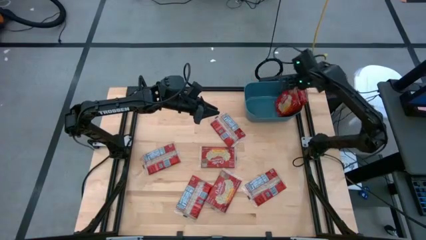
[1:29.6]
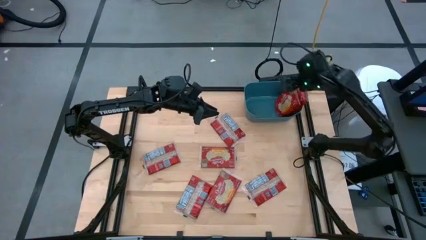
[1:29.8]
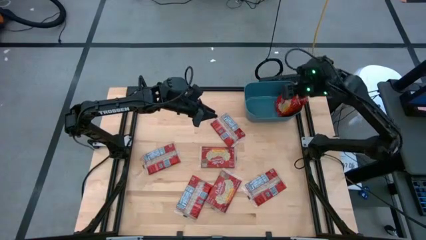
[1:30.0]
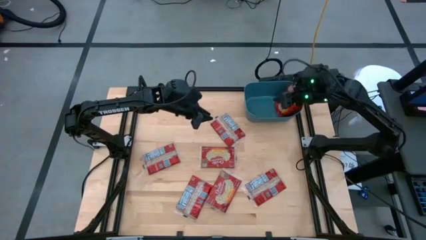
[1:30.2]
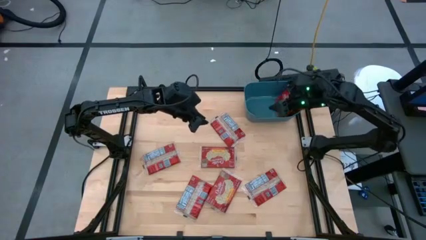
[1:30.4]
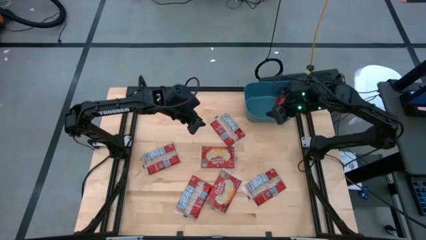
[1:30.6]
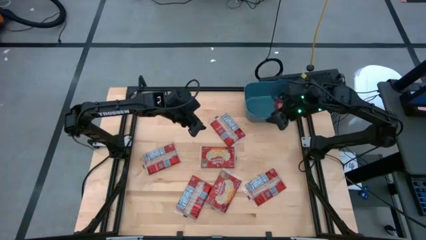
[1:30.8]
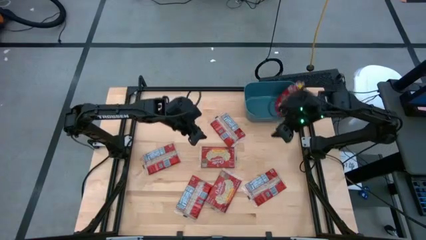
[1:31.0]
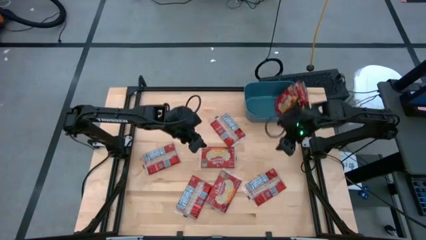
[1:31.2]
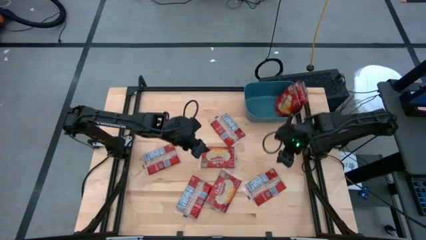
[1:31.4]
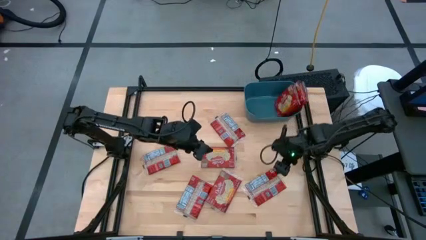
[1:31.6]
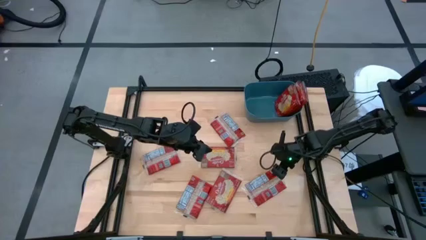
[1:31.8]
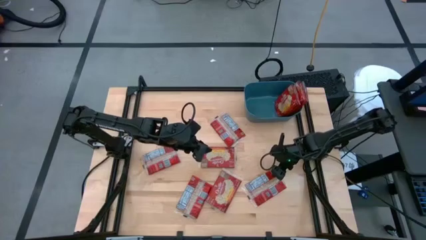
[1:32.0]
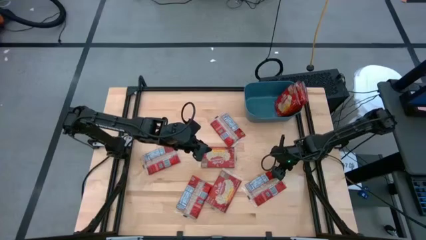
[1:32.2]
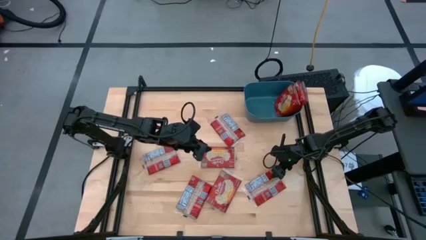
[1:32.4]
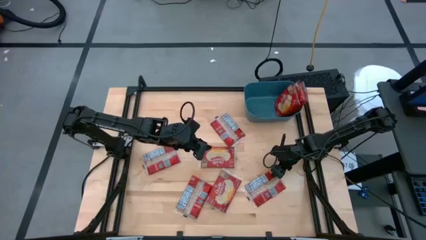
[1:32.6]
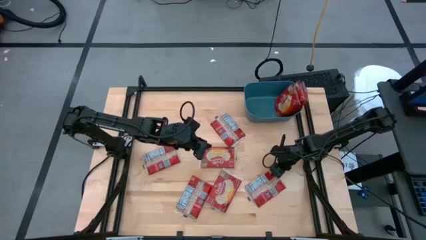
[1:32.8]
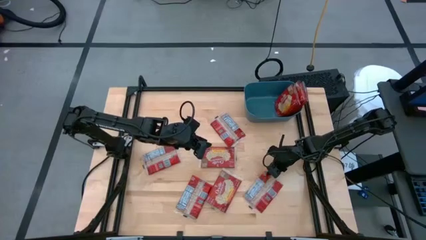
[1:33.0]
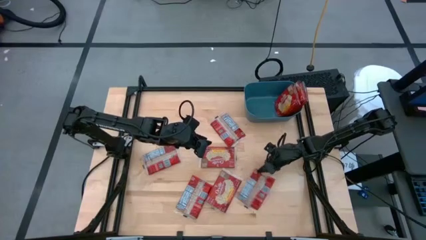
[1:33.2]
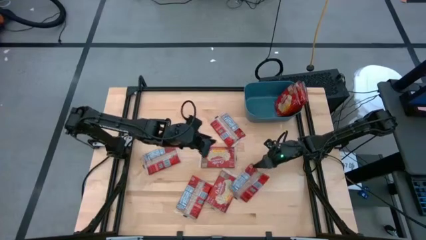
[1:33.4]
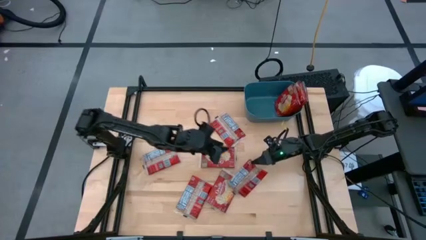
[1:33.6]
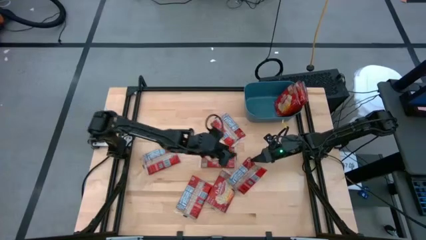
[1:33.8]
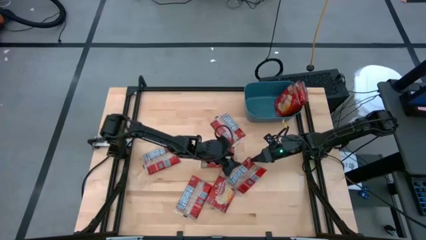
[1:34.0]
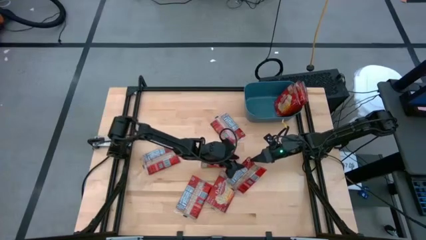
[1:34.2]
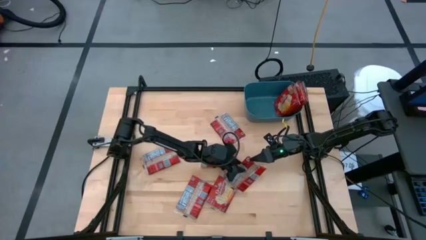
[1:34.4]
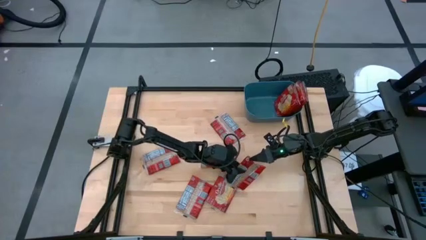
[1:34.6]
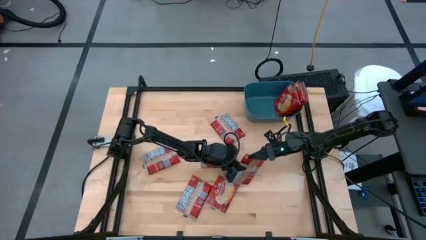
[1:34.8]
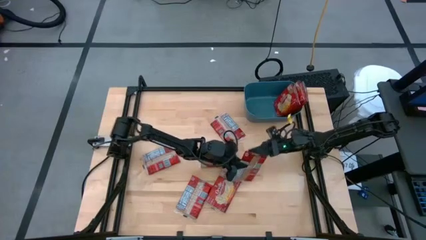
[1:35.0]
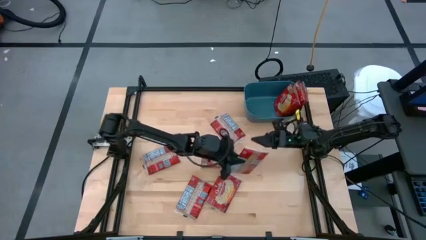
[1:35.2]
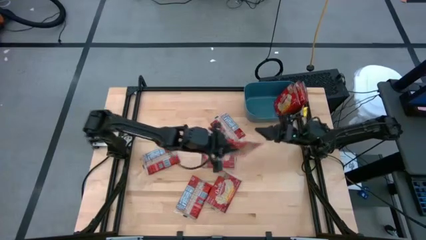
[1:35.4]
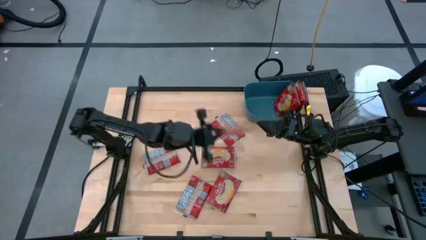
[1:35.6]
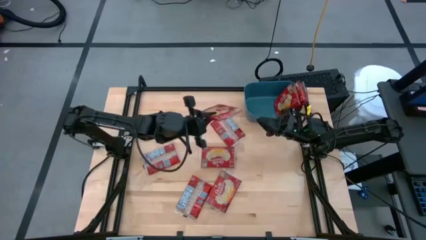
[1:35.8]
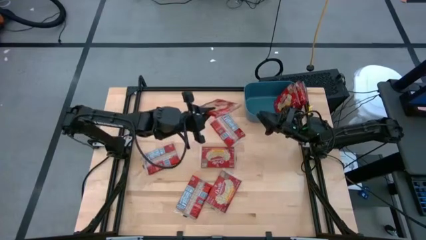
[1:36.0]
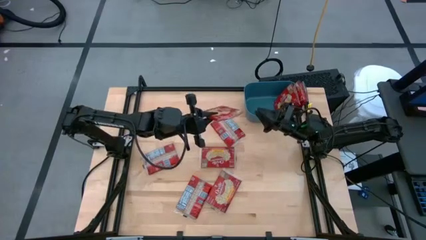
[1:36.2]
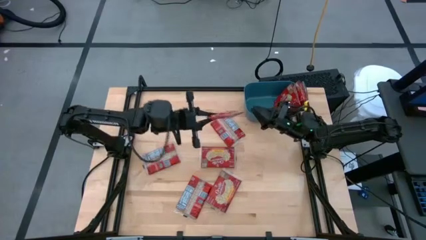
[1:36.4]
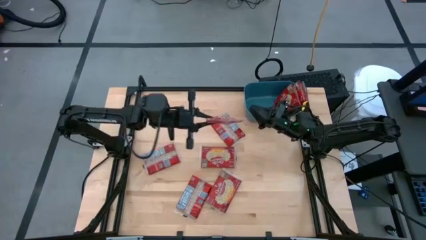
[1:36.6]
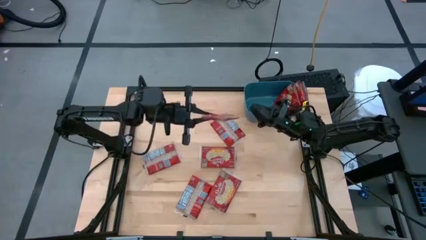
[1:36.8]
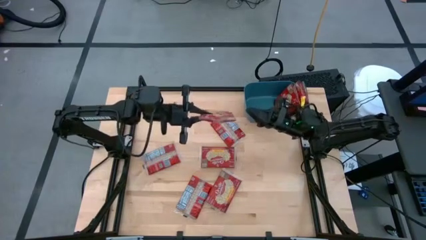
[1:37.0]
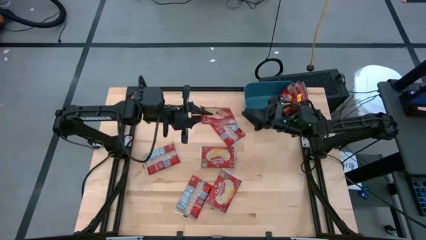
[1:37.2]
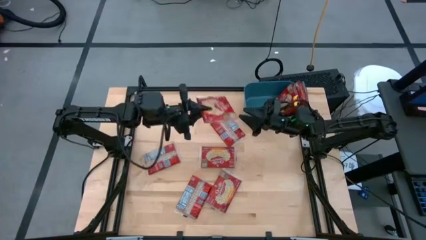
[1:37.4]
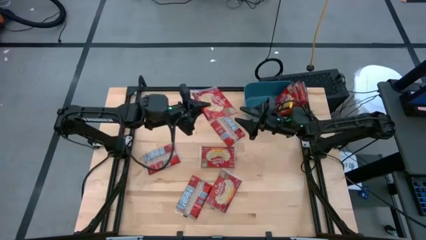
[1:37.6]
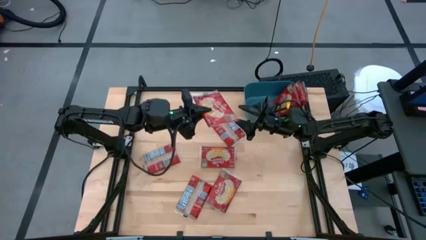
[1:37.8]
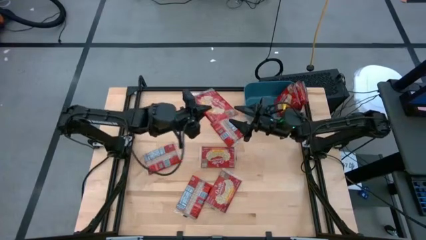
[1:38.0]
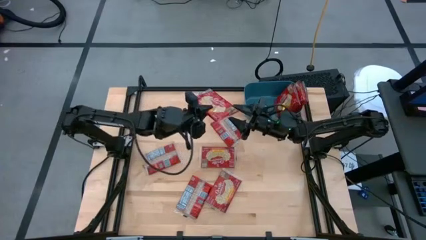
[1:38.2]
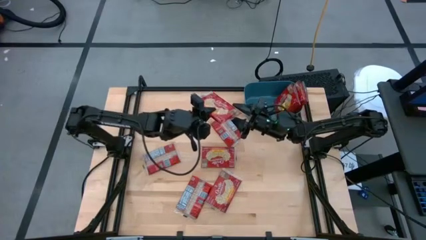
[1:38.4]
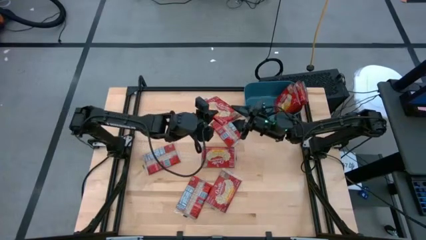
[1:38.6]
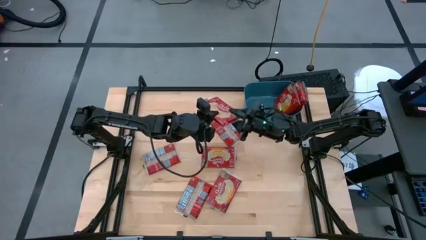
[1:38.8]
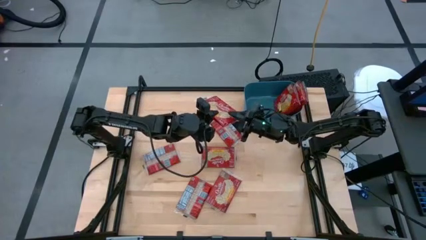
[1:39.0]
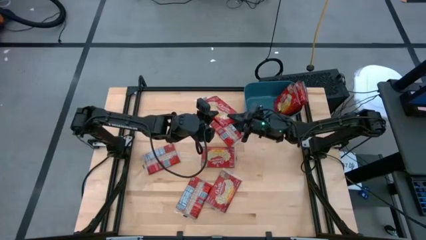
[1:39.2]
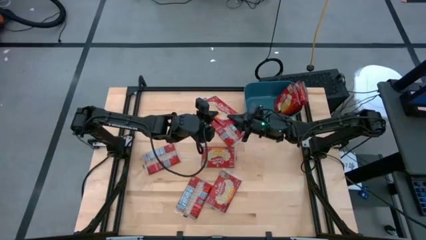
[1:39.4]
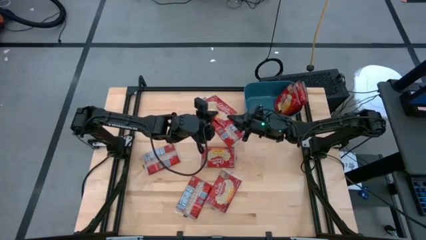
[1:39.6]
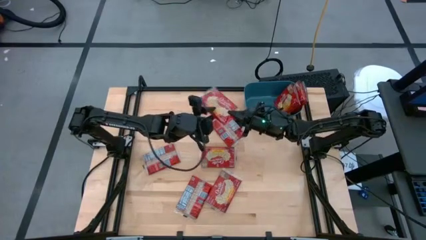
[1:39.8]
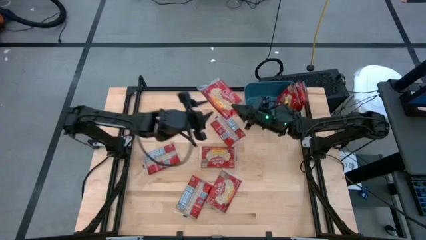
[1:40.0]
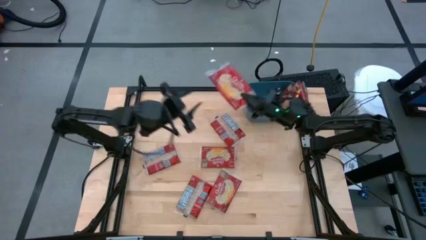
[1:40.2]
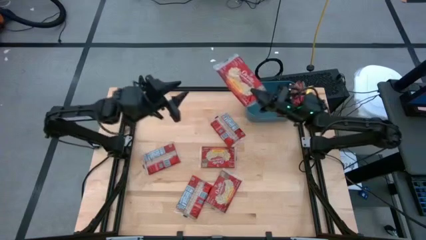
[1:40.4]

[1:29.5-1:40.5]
Task: Sort popcorn bags into baskets
Put the popcorn bag into the blue bin

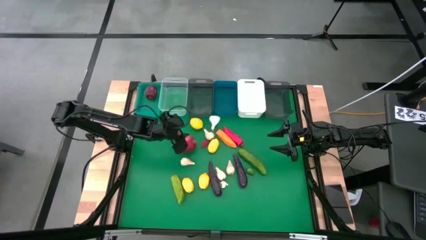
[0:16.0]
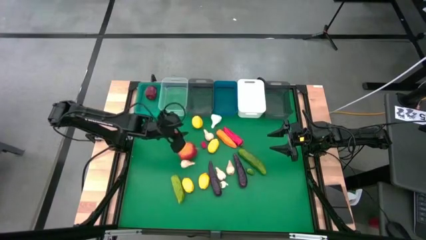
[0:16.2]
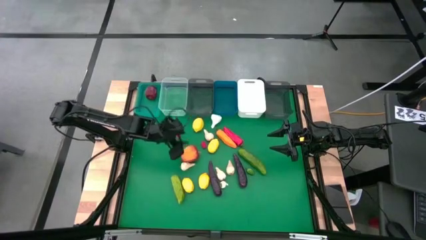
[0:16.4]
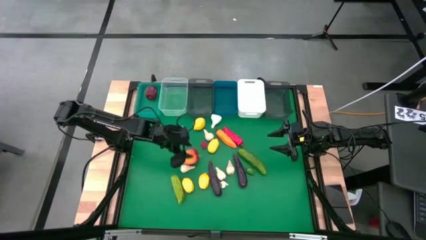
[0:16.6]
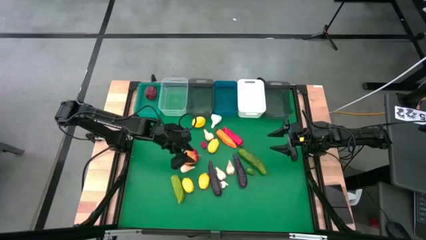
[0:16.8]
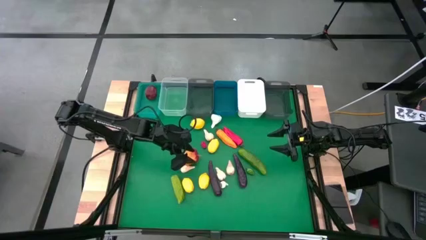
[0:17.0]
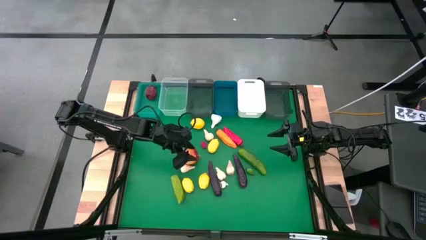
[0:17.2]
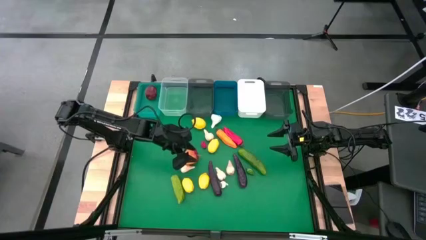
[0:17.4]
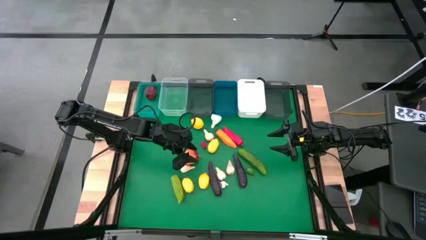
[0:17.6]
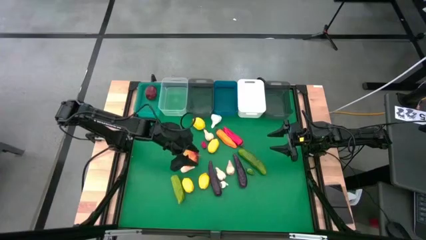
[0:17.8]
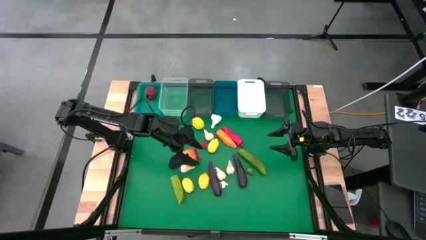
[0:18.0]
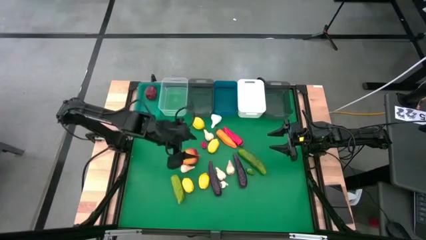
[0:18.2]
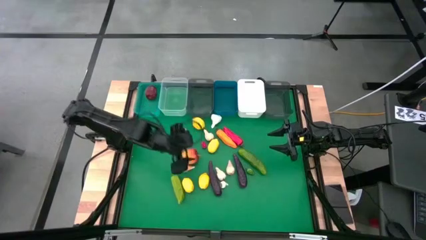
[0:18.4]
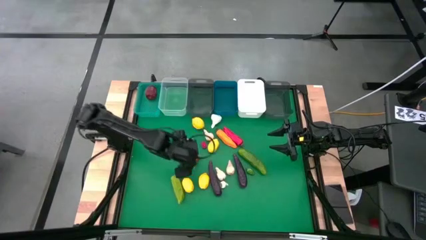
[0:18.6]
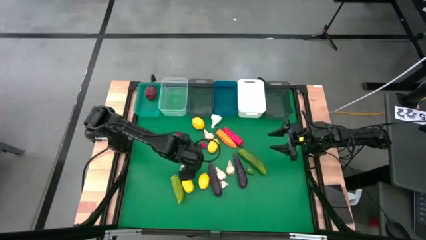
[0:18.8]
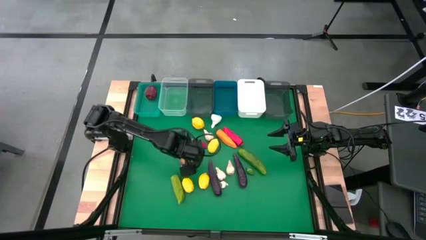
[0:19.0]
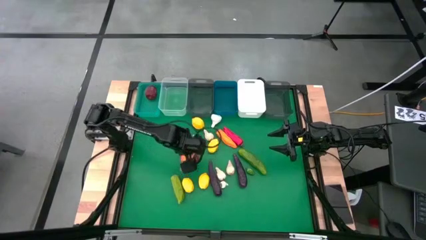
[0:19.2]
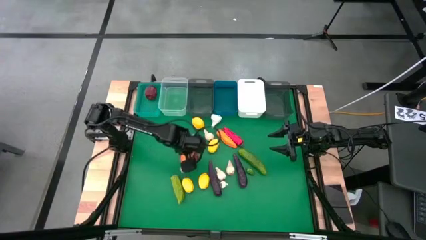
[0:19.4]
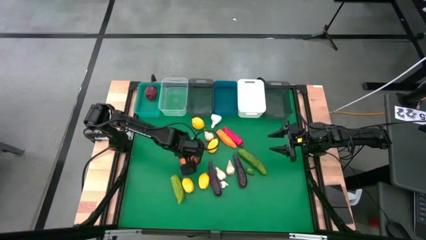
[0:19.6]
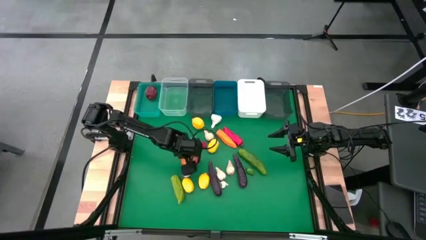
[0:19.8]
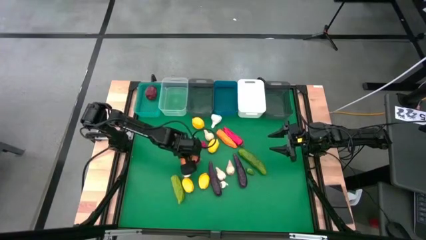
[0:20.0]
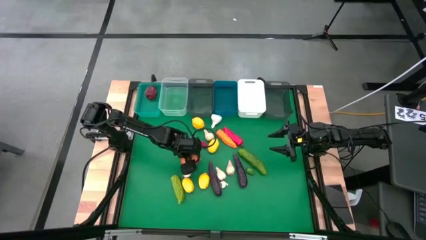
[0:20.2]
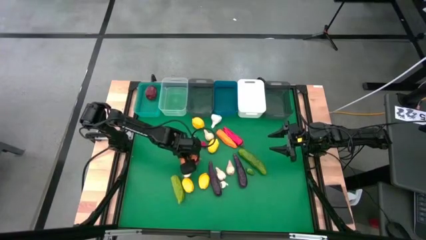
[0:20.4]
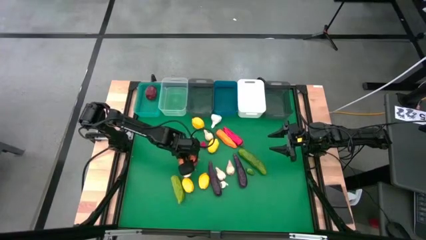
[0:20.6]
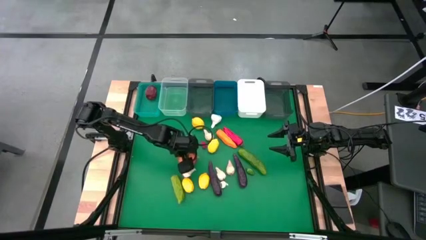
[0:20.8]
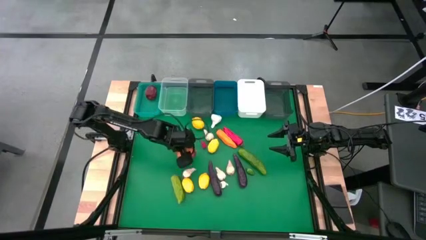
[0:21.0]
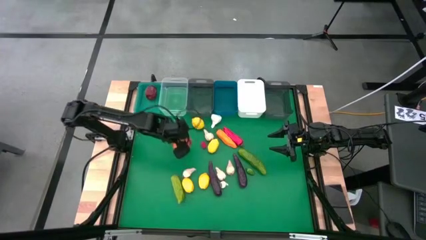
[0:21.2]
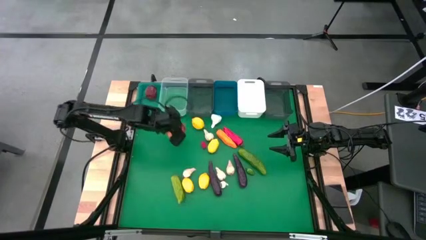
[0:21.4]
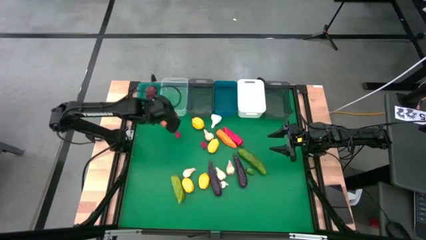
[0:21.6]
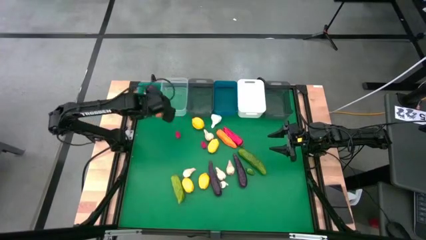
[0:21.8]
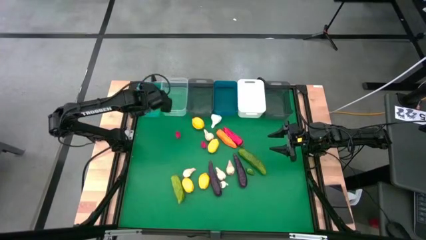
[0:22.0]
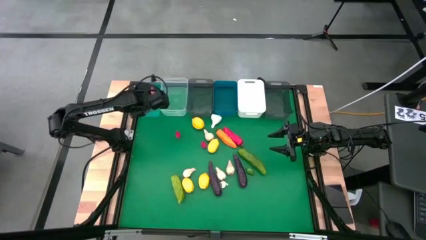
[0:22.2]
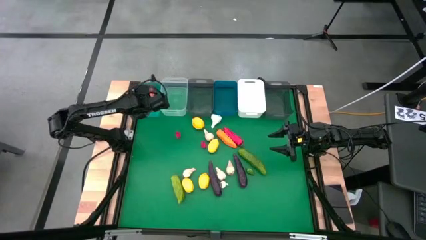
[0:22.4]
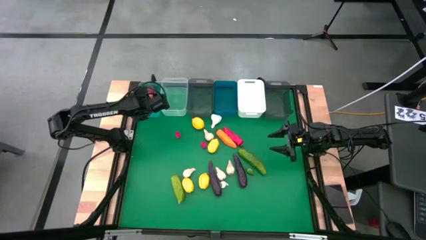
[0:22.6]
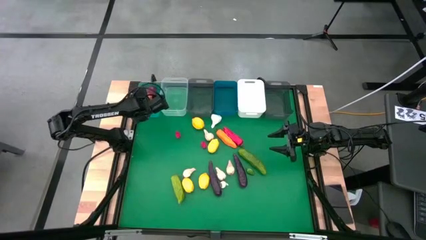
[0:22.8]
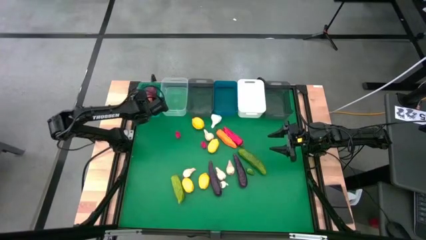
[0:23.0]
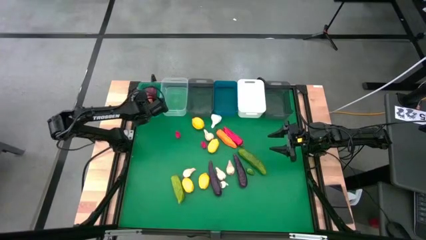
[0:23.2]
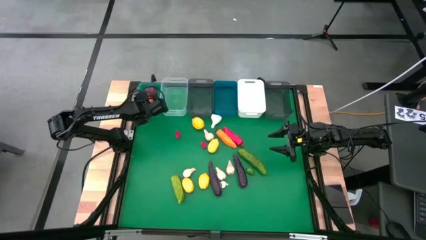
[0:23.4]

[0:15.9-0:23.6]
Task: Sort produce into baskets
Put the red apple into the green bin
